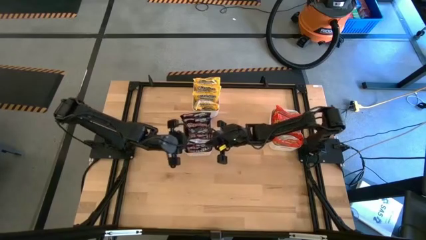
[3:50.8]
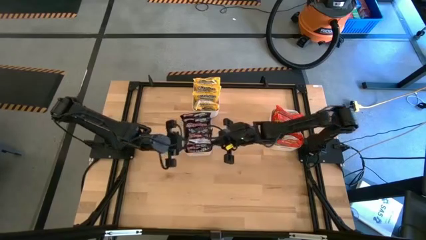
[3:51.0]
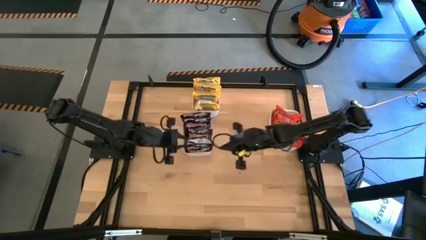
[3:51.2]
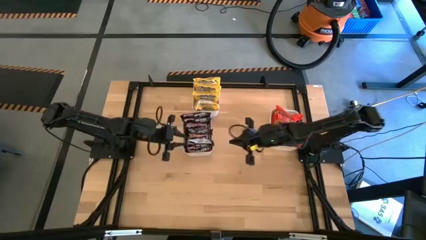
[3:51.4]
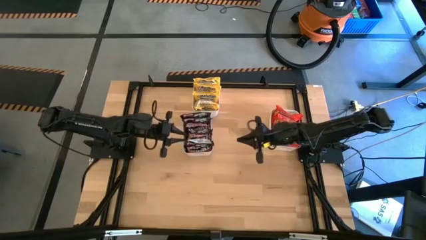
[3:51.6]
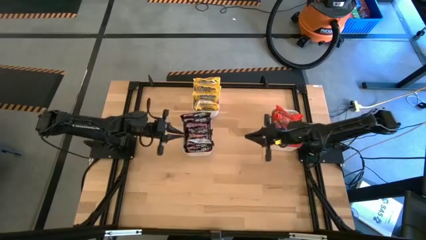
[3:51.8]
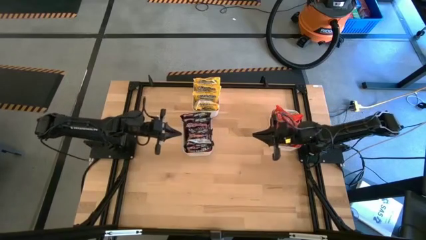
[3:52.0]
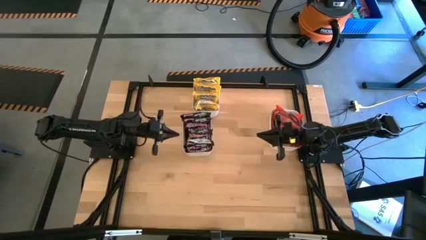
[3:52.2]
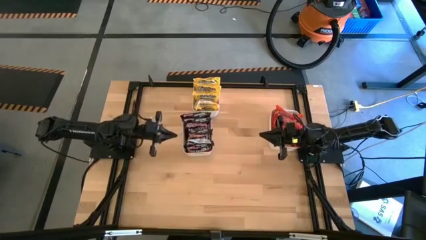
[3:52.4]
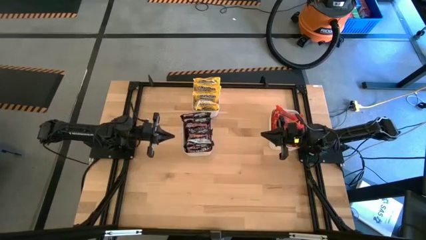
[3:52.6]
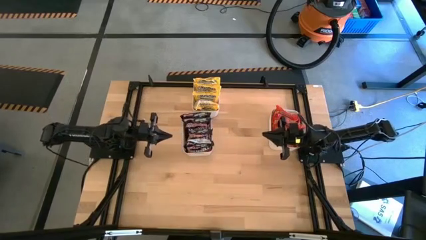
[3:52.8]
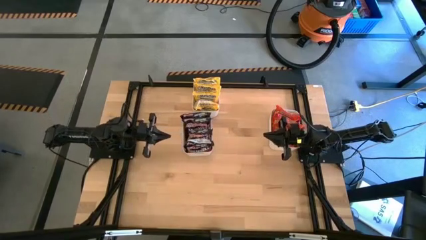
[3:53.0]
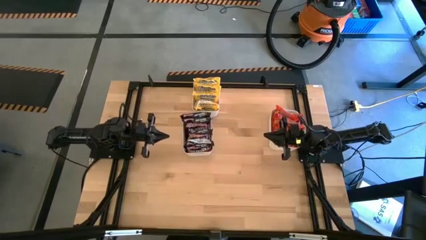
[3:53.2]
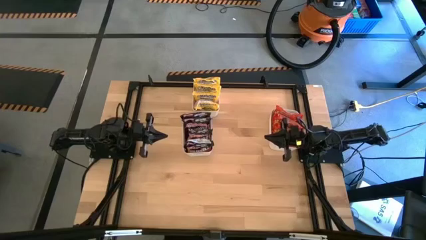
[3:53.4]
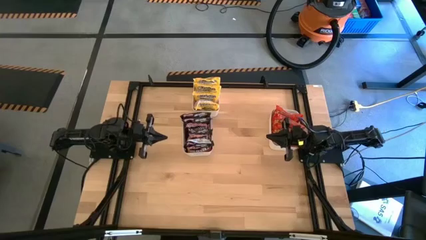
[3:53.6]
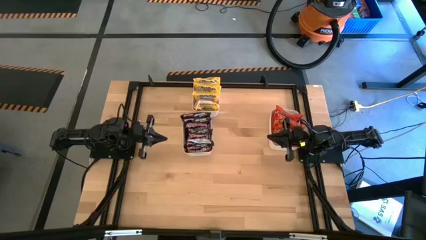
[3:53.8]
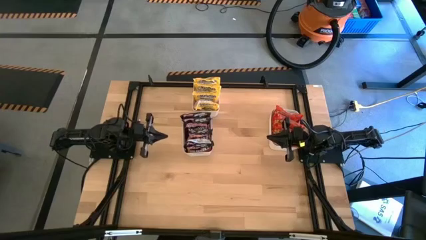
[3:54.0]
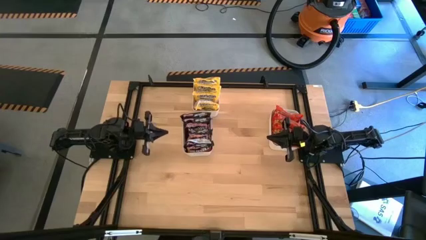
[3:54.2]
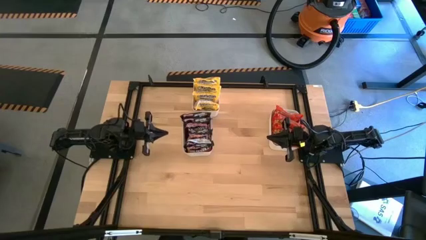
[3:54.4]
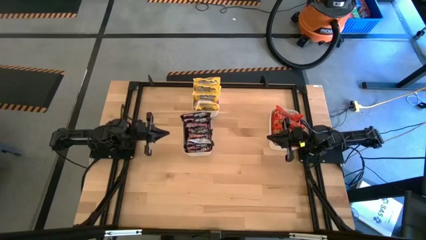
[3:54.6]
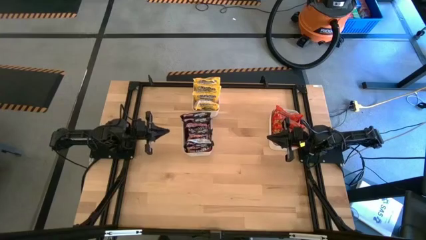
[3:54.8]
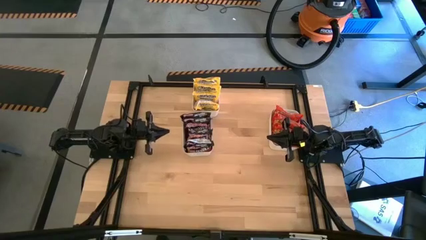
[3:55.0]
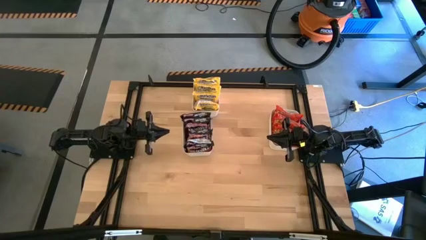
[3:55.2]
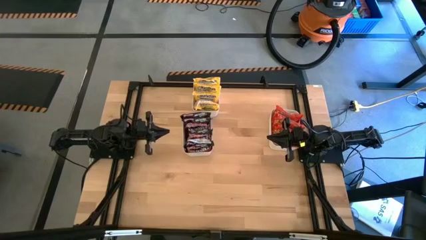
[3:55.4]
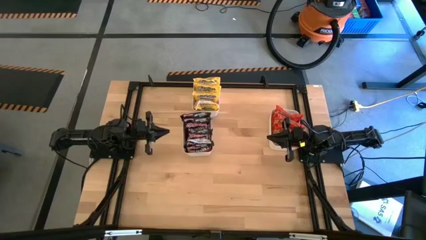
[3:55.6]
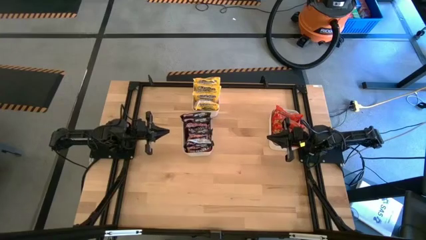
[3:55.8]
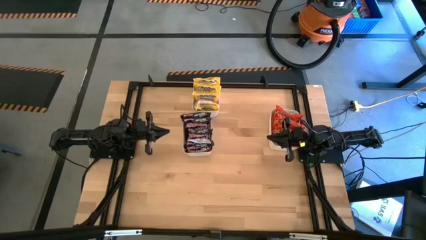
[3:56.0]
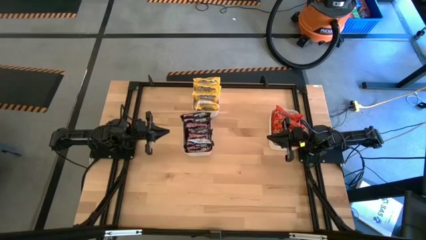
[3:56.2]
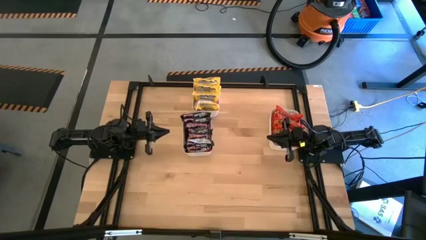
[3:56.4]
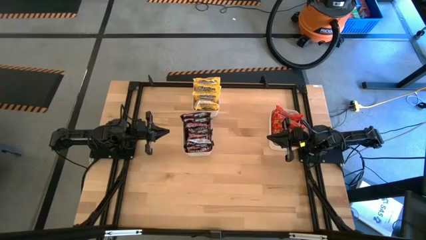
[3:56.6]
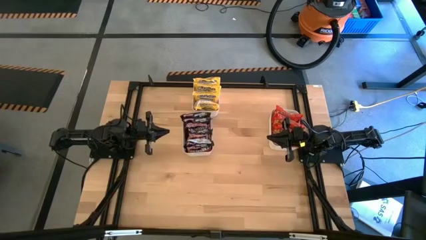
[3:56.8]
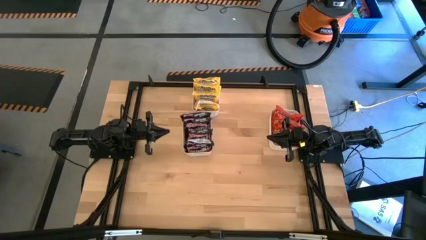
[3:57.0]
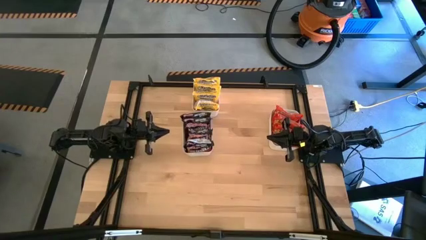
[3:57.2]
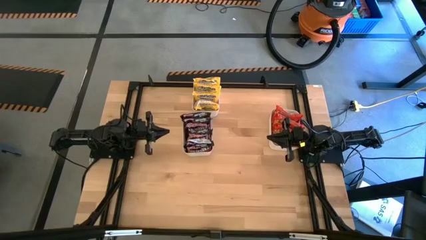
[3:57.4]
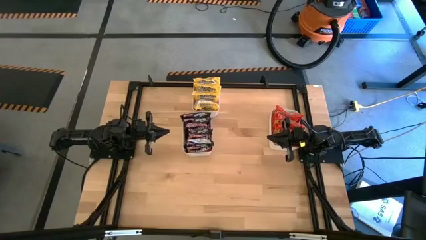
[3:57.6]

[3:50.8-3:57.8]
Task: Sort Maruchan noodles
Return to Home Position

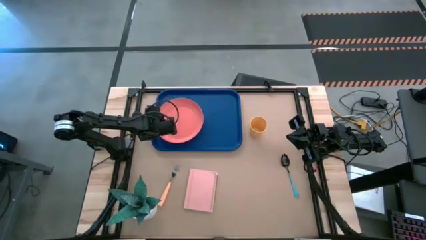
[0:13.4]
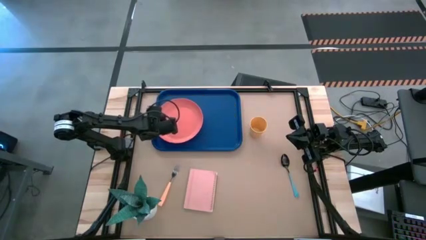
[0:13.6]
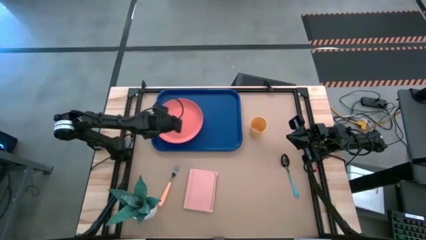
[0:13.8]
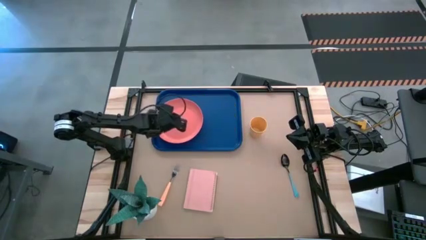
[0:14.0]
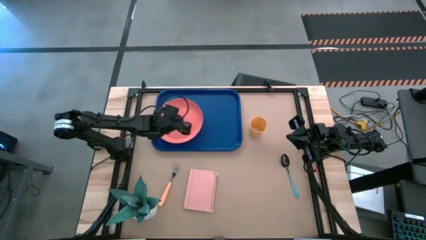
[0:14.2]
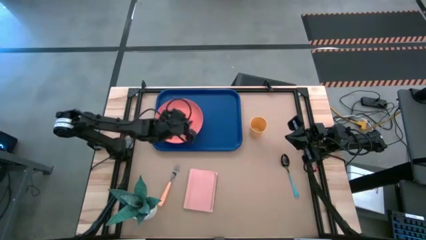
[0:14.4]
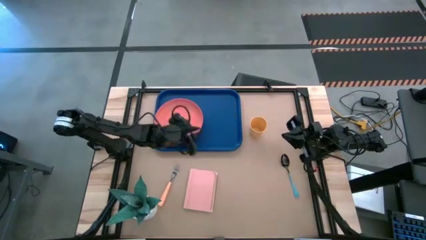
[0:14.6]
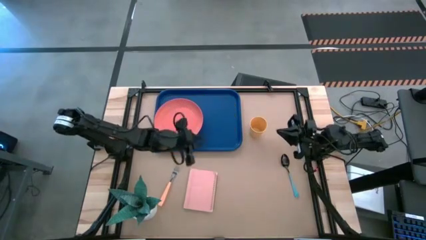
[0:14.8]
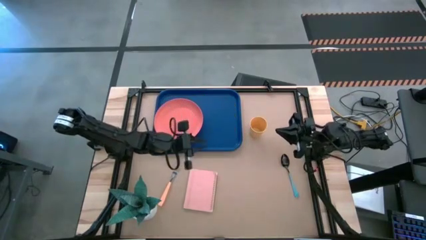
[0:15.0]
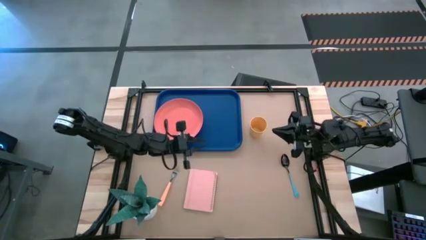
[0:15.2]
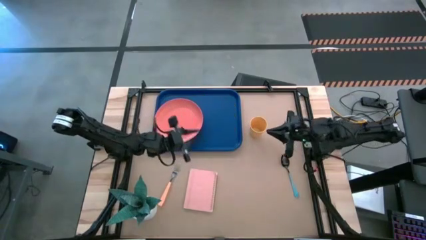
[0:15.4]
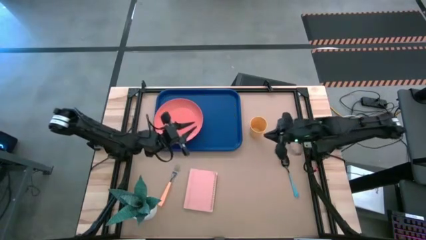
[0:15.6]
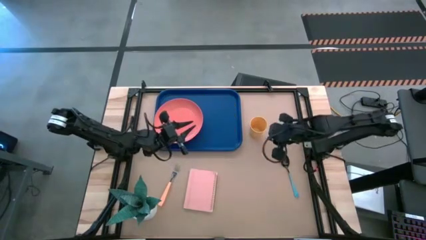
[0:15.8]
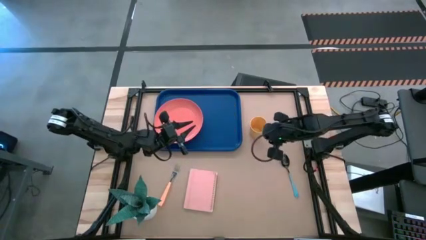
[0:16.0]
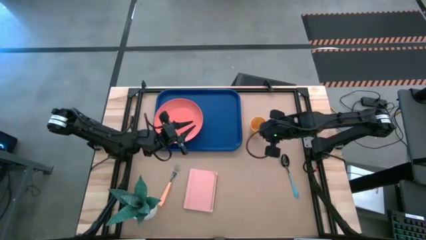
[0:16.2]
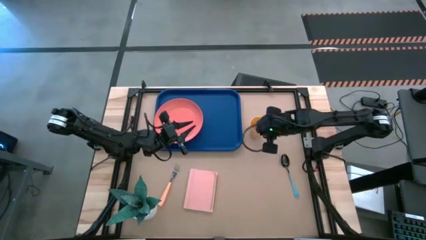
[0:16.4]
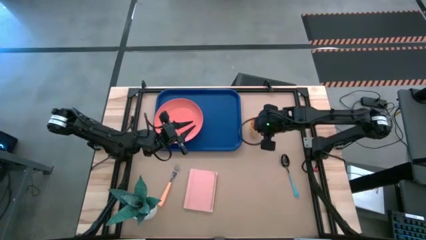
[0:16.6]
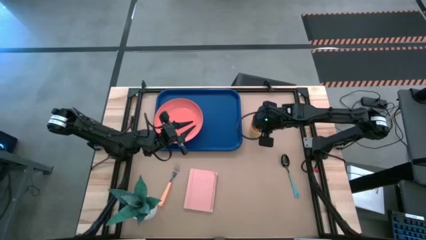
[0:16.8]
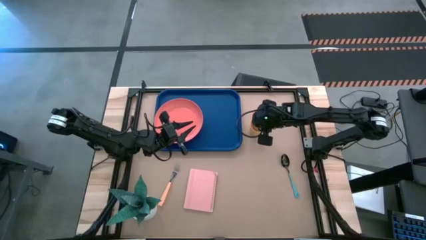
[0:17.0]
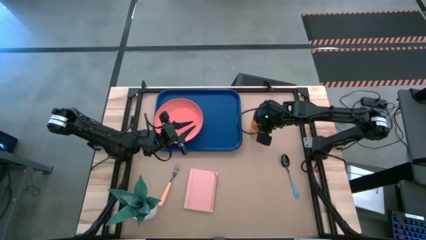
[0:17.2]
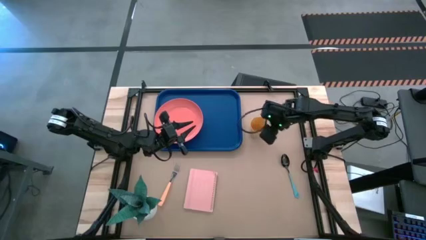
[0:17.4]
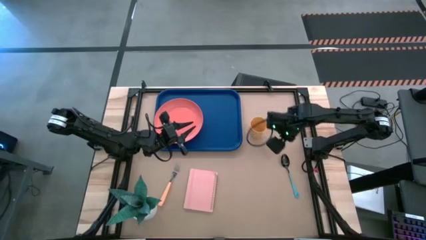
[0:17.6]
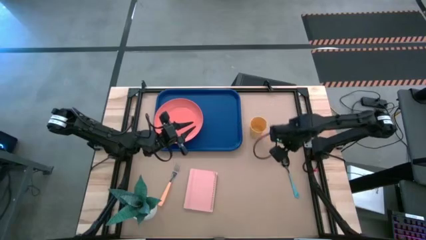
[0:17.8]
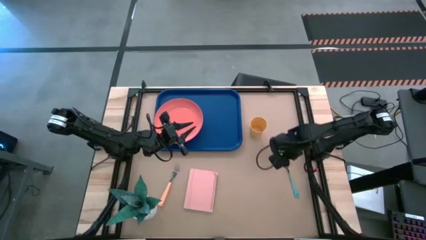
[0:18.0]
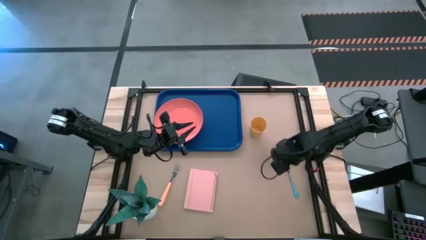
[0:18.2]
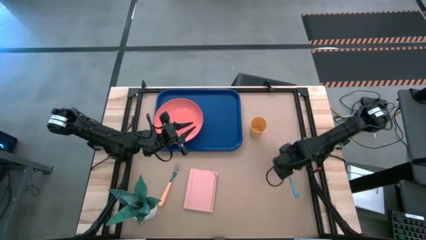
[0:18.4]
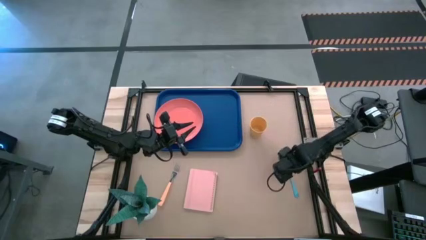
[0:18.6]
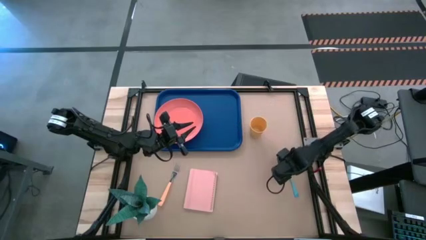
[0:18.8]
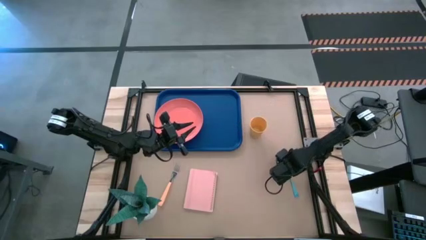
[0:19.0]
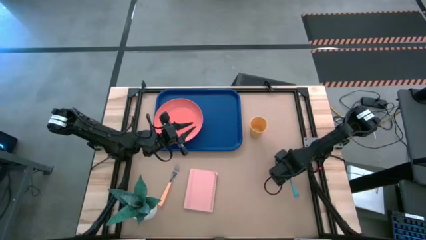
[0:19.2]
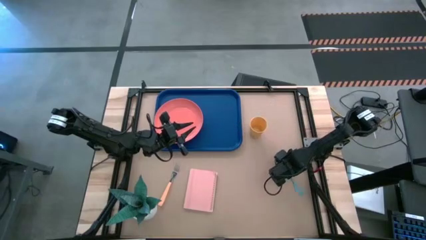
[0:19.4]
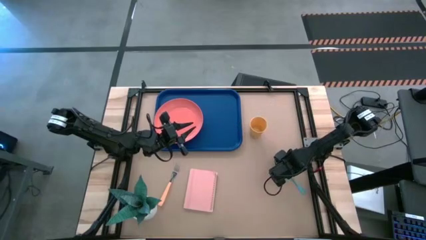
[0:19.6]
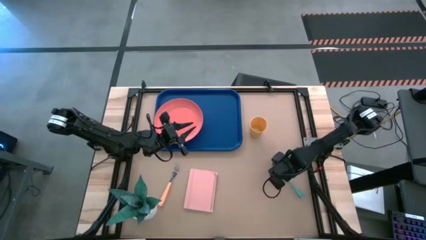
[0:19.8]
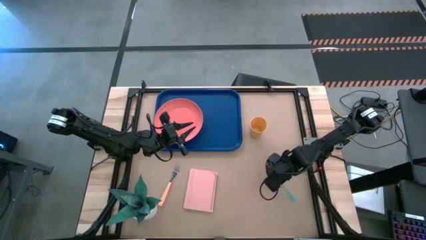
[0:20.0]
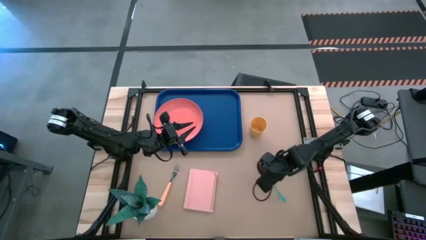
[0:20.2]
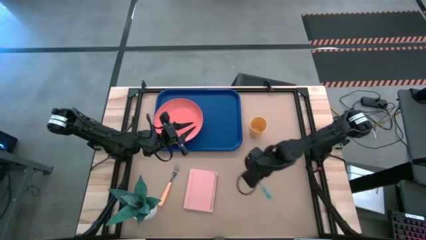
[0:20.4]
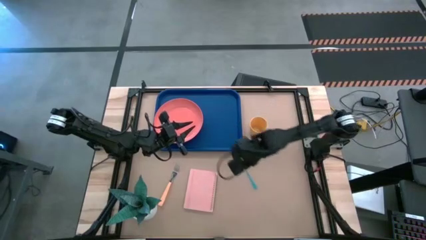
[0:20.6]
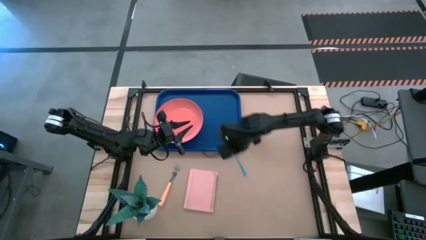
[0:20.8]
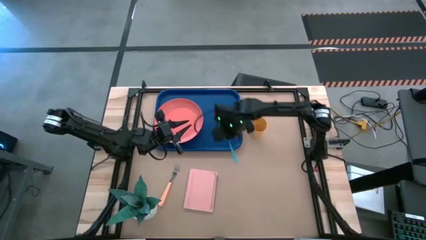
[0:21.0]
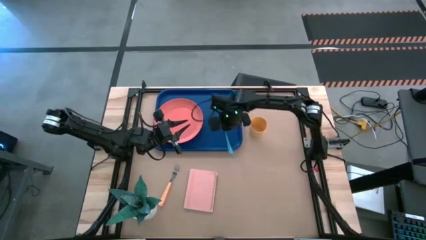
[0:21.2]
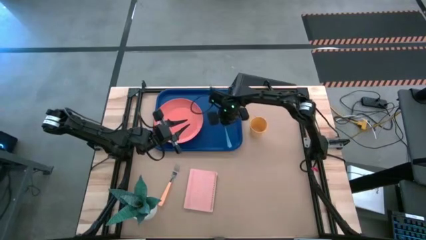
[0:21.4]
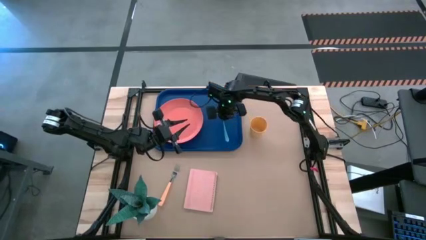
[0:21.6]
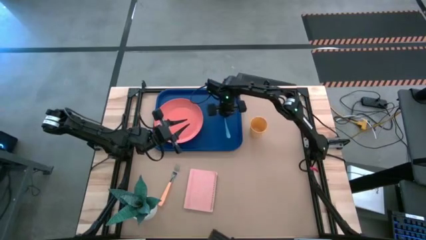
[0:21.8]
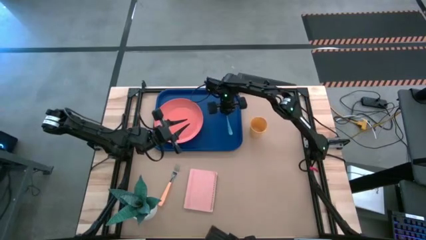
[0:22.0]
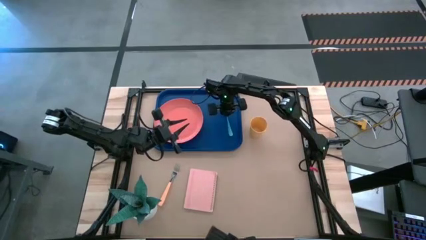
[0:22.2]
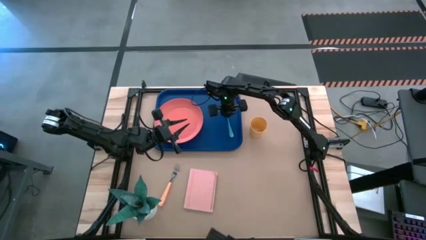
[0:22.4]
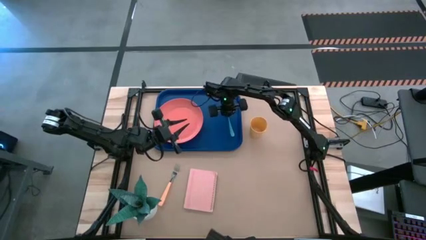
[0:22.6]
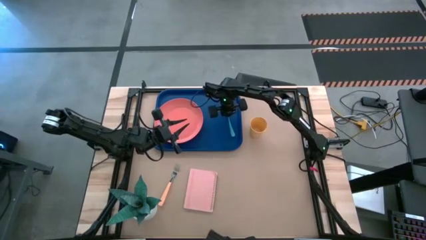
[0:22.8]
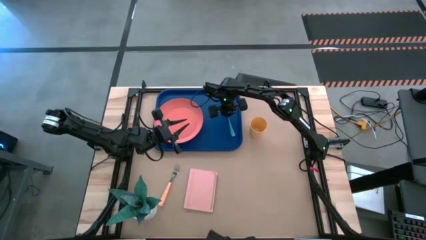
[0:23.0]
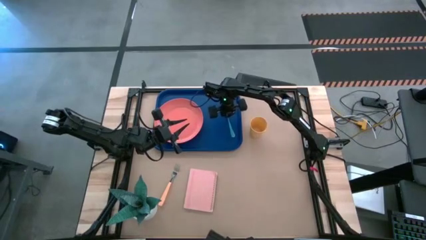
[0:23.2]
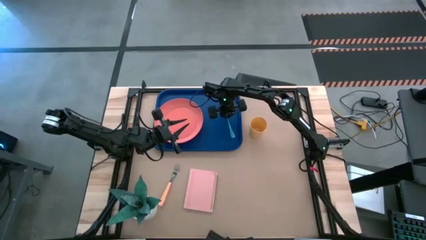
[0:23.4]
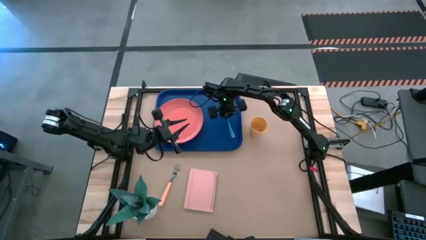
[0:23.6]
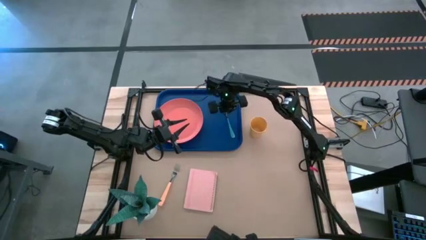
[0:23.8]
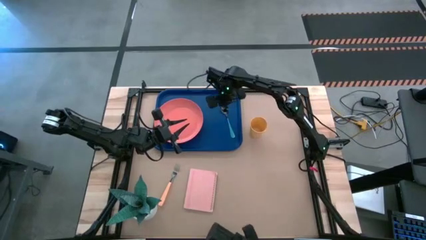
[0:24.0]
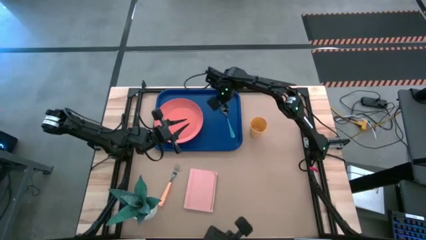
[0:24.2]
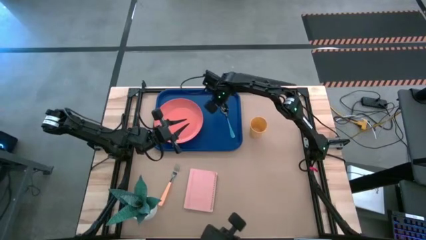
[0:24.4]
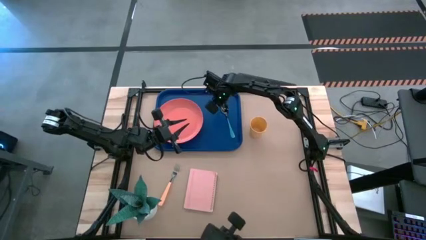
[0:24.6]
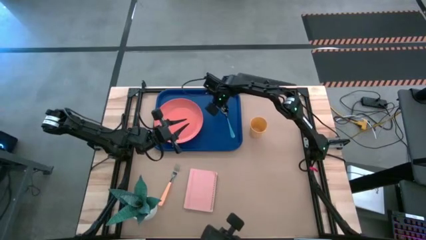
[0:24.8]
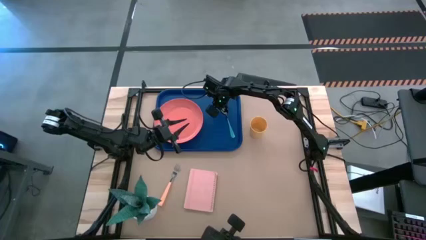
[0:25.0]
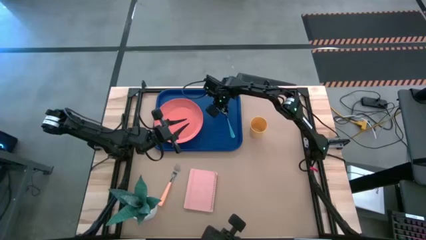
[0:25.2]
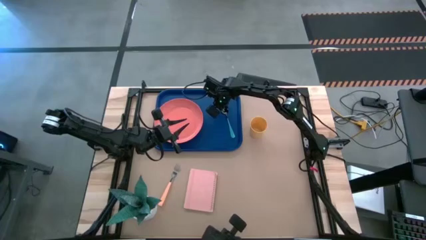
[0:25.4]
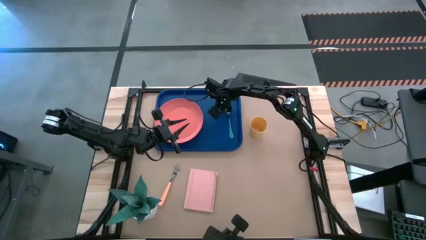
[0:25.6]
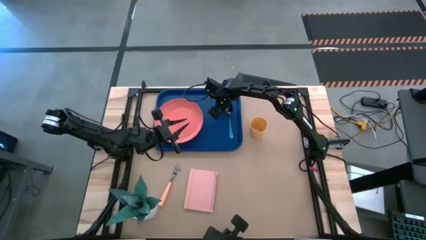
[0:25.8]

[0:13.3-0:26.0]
Task: Pick and place plate/cup/fork/spoon on tray
Put the light blue spoon to the right of the pink plate on the blue tray
